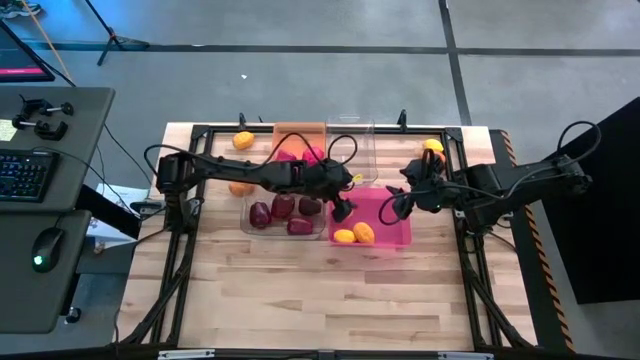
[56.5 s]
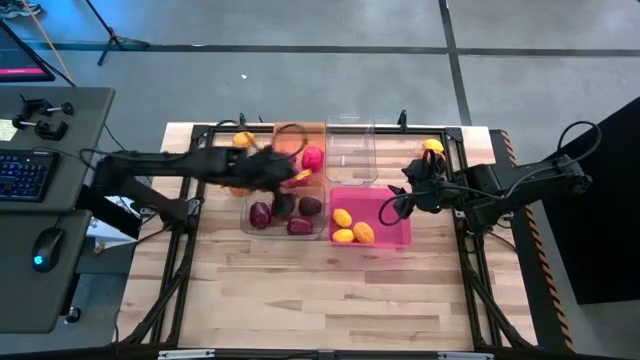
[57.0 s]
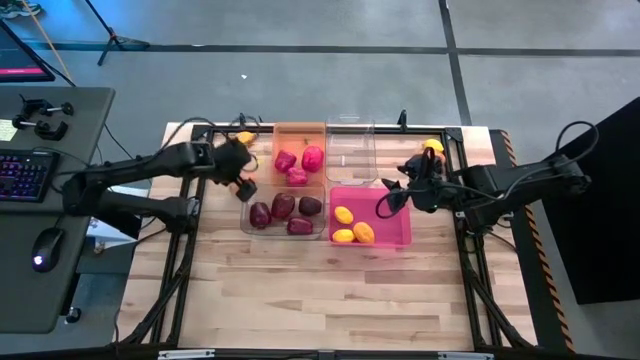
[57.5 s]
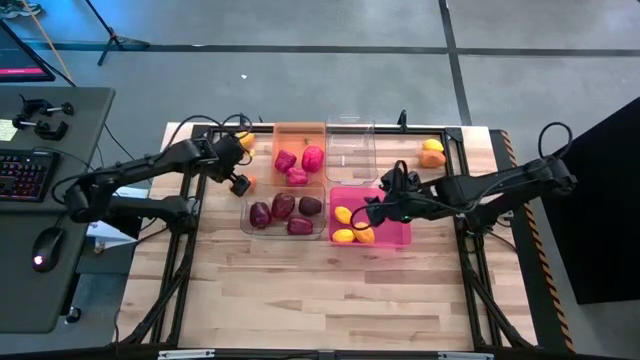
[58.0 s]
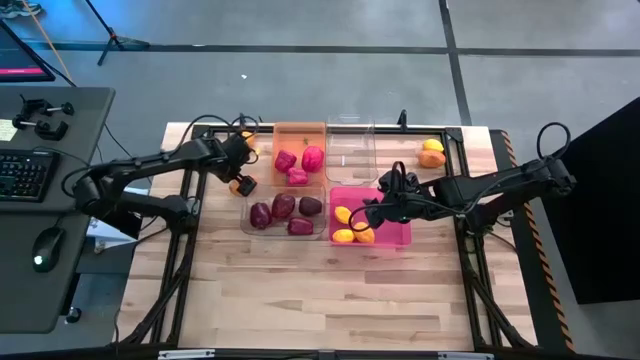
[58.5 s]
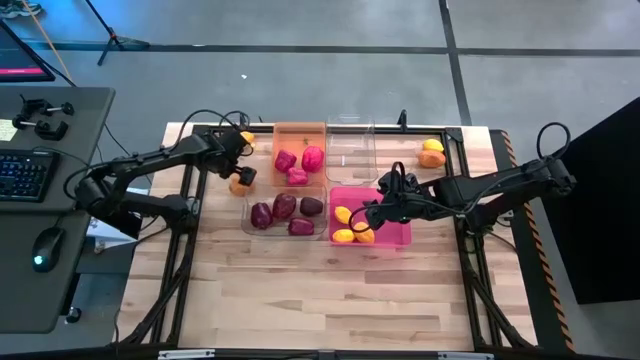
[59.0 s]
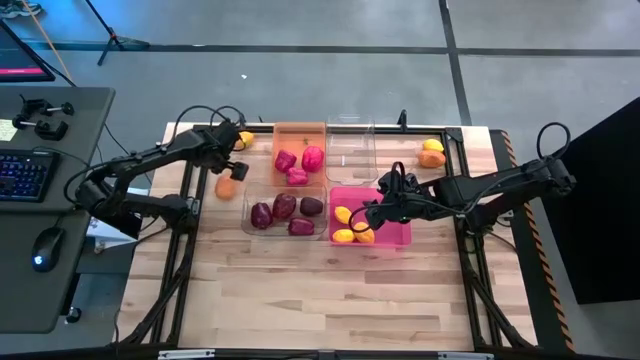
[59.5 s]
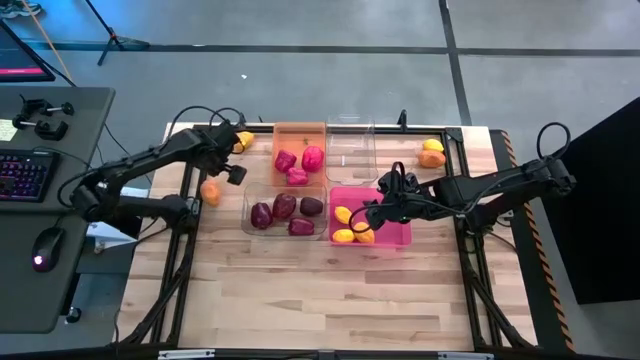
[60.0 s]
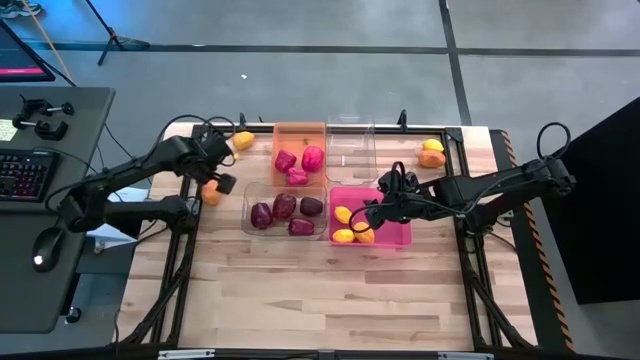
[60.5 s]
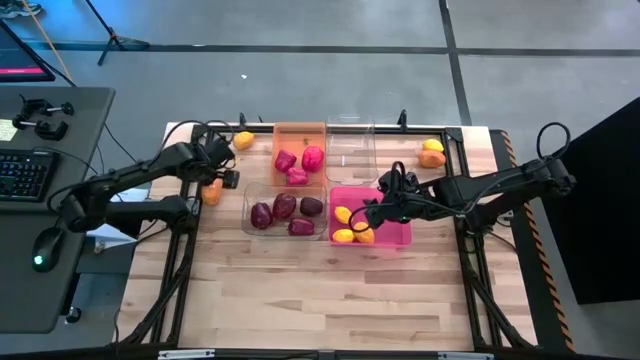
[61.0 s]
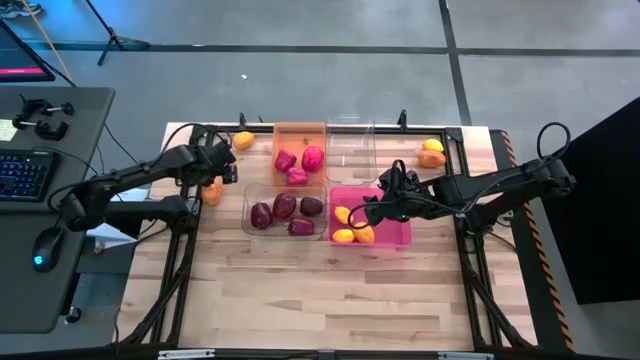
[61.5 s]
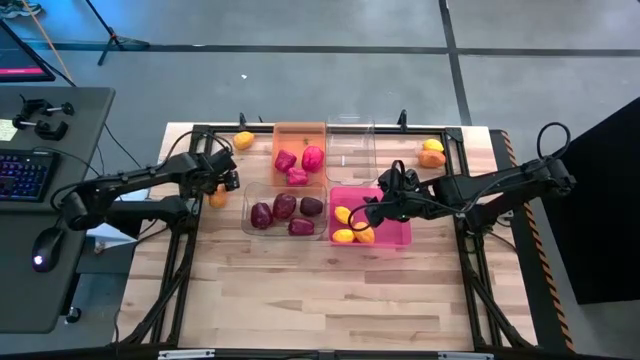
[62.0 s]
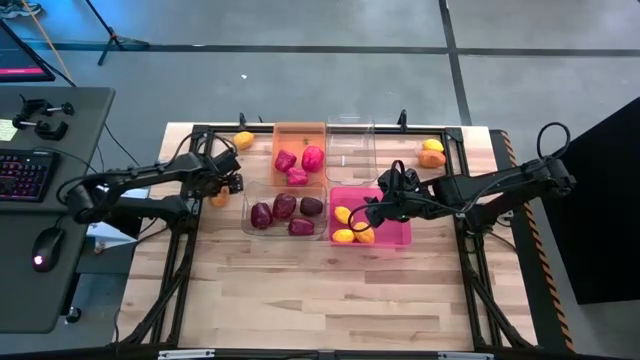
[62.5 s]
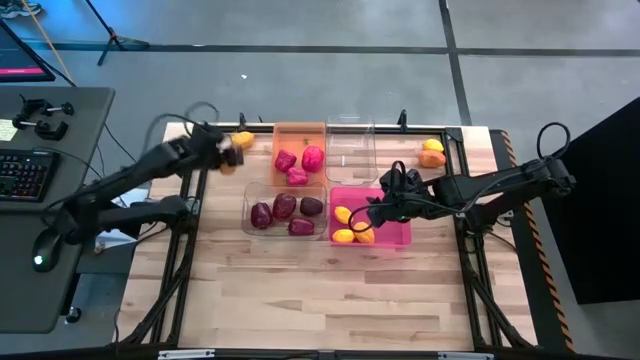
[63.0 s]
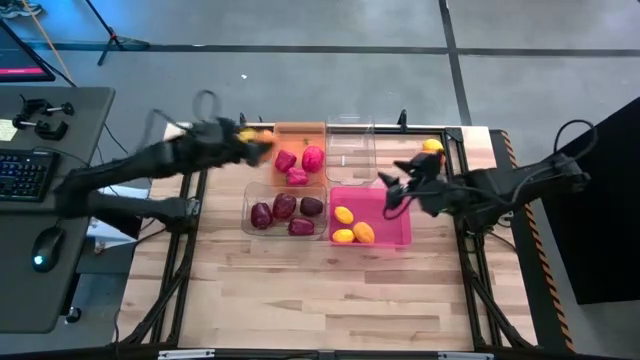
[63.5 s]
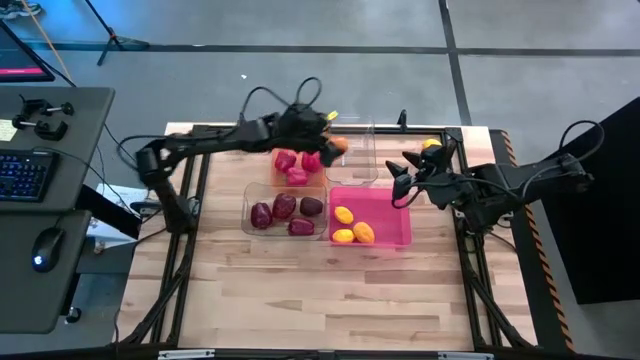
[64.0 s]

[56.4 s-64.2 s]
Task: Sort produce into baskets
Put the potato into the top transparent bin

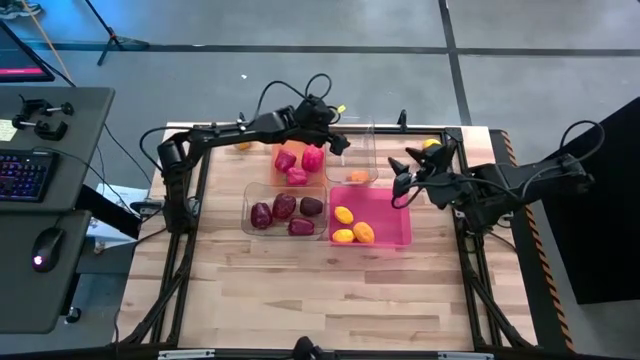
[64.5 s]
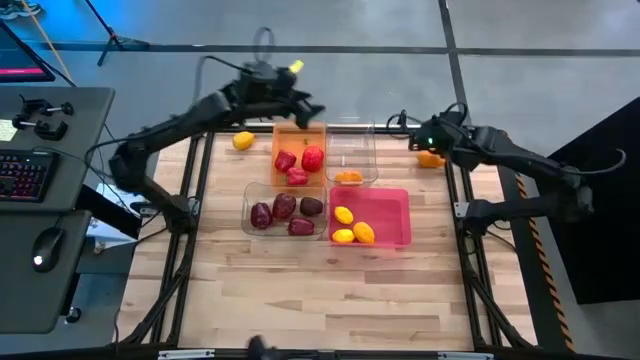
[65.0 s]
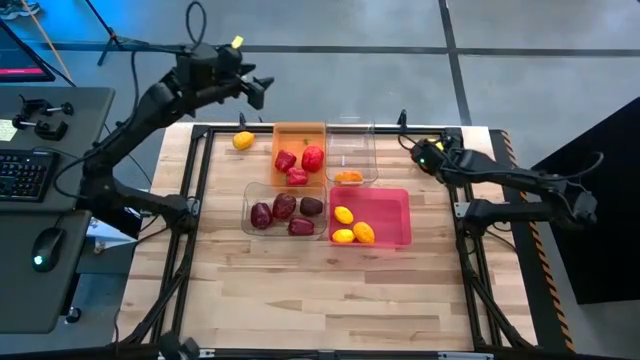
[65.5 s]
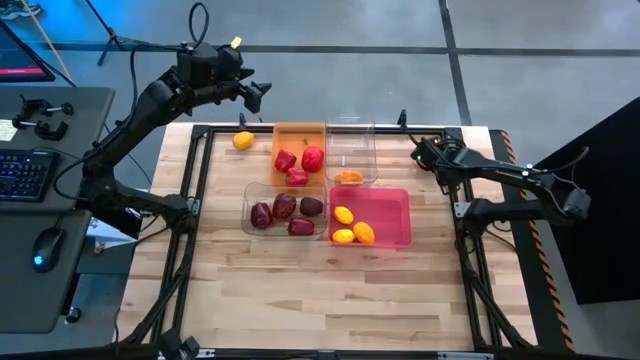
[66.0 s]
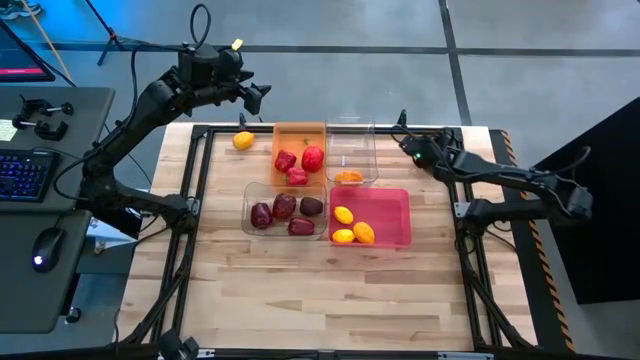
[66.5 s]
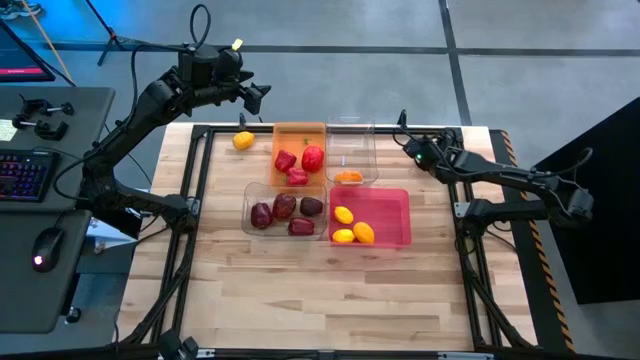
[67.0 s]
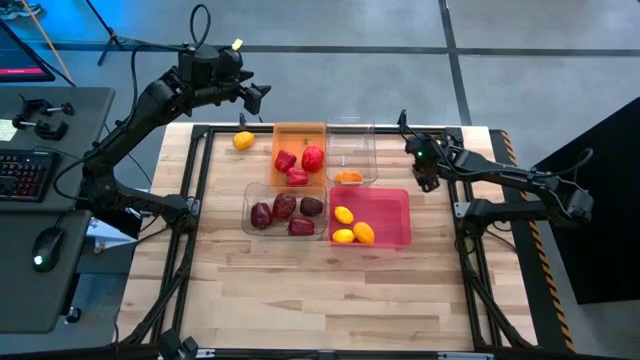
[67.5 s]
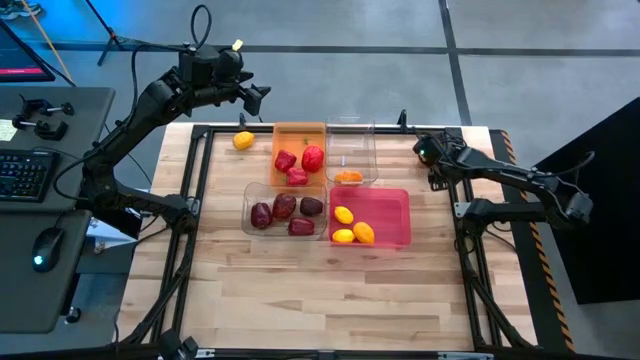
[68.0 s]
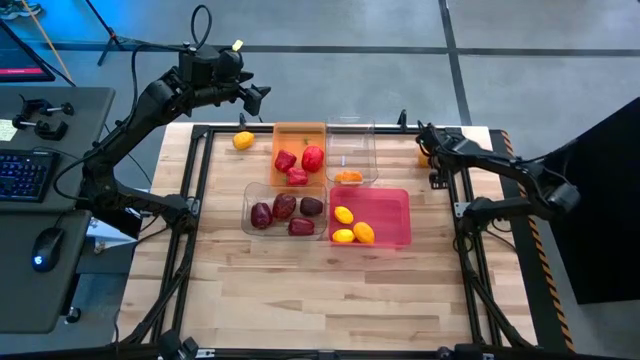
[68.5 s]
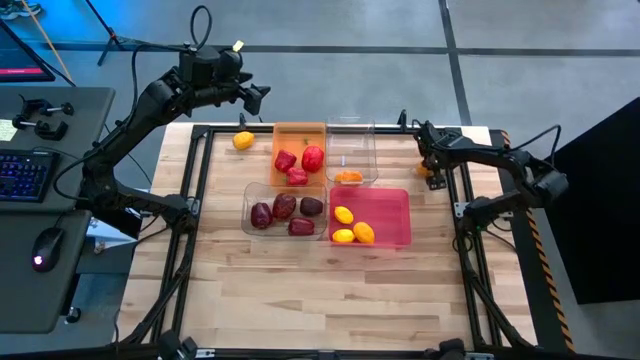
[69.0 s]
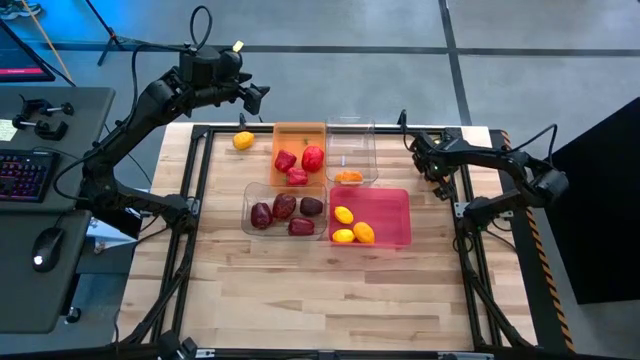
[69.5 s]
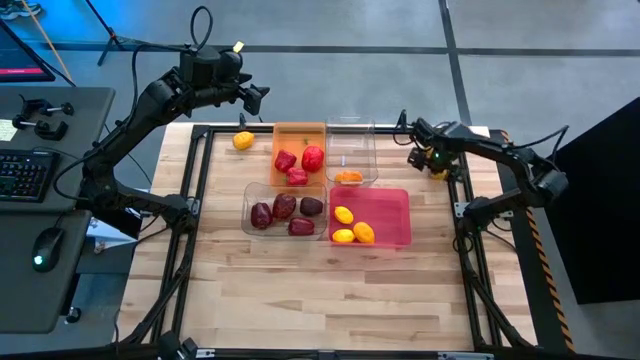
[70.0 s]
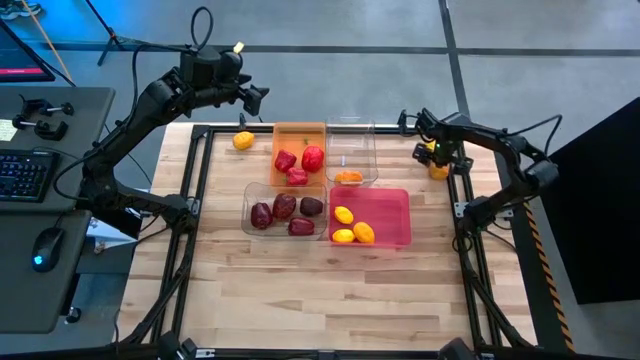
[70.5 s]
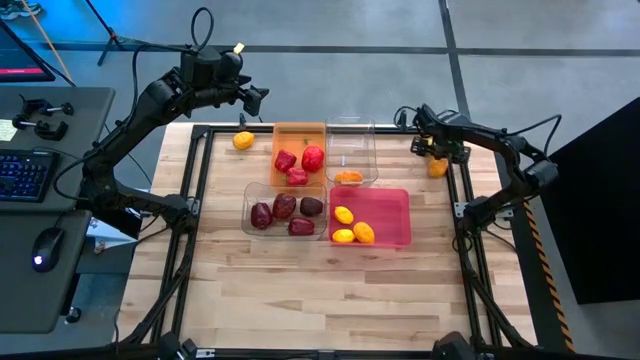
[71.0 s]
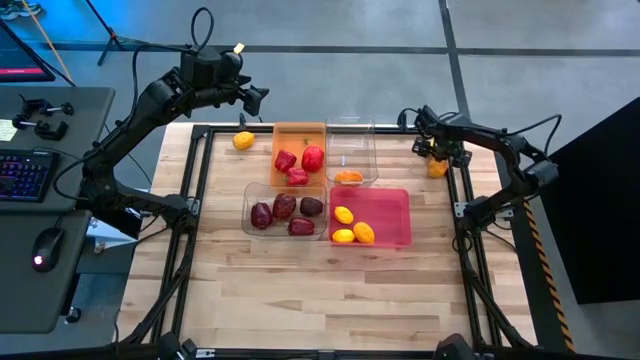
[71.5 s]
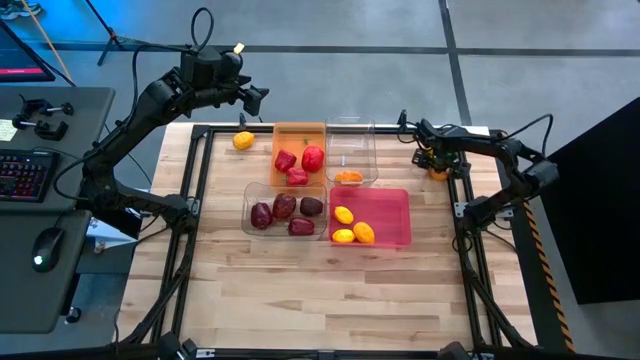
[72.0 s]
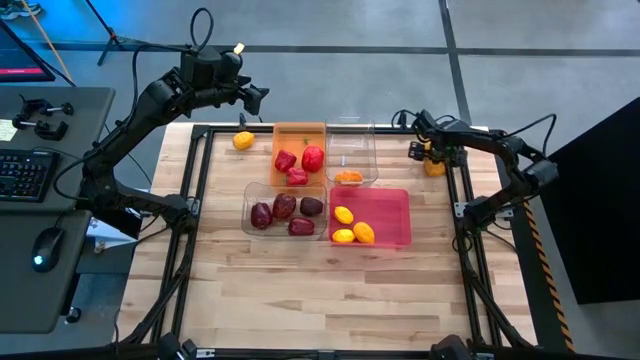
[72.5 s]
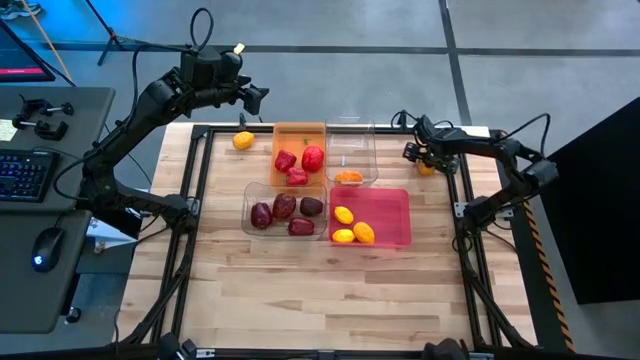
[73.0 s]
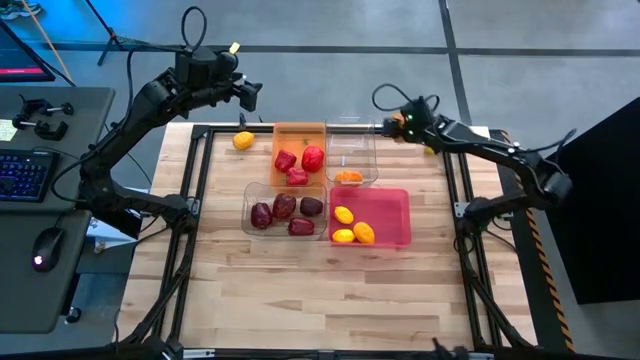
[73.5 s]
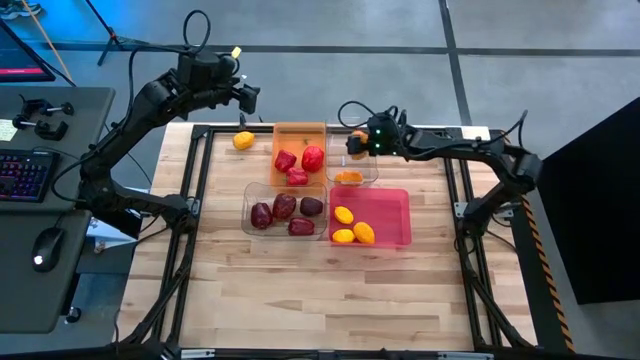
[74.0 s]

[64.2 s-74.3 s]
Put the potato into the top transparent bin

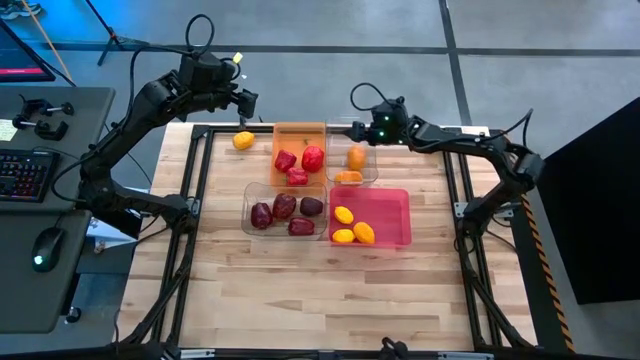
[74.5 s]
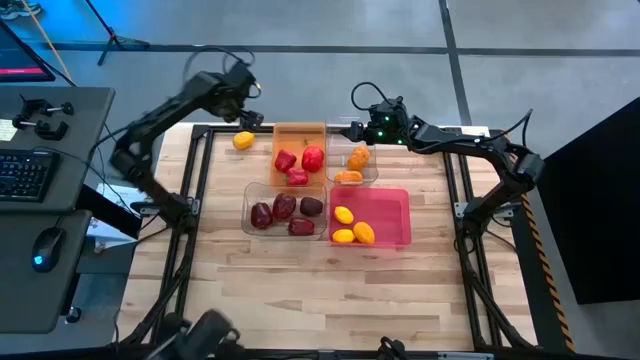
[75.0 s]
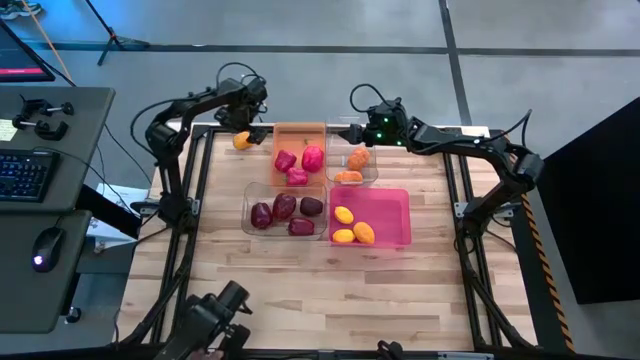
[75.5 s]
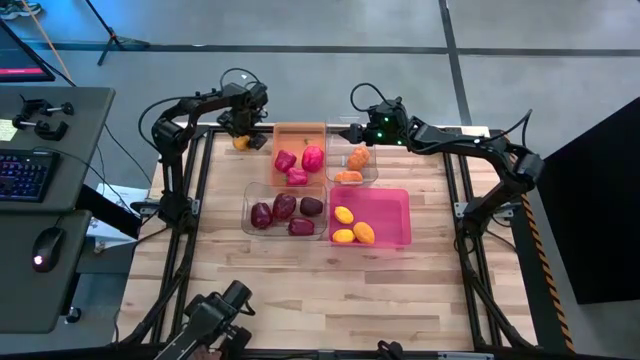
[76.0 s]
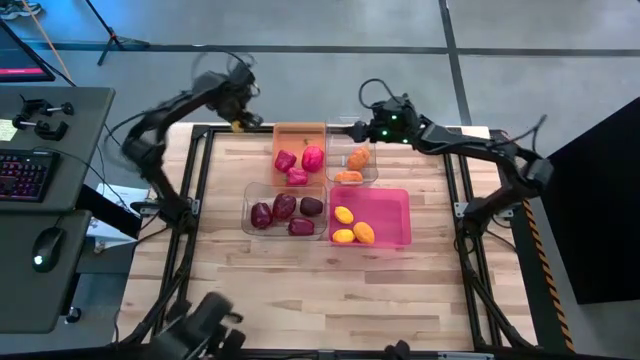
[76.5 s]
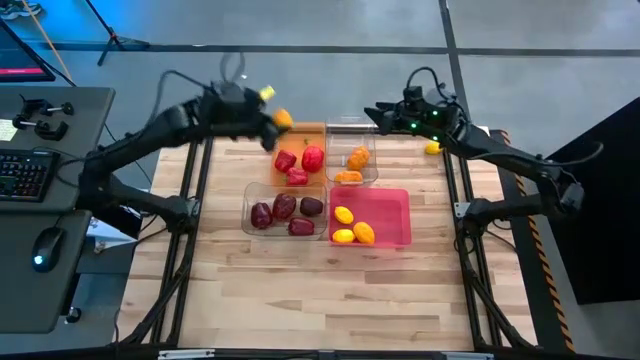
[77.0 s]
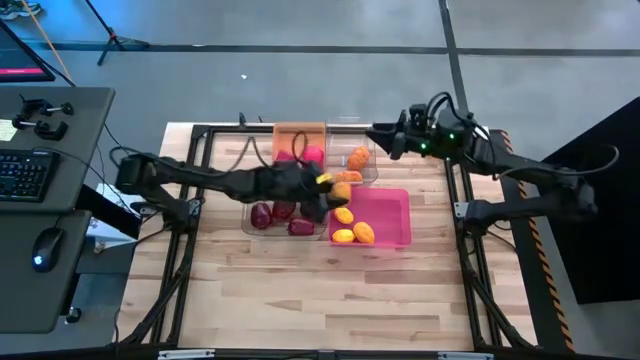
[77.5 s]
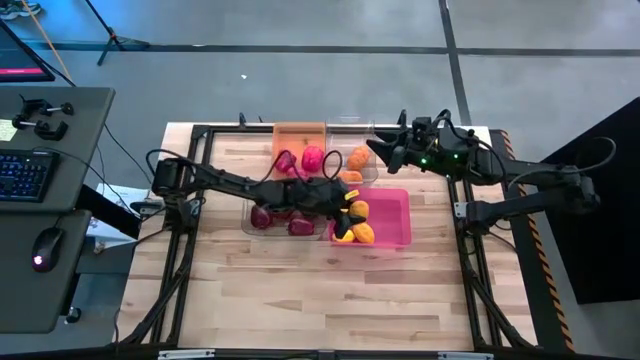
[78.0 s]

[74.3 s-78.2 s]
Put the lemon into the pink bin
